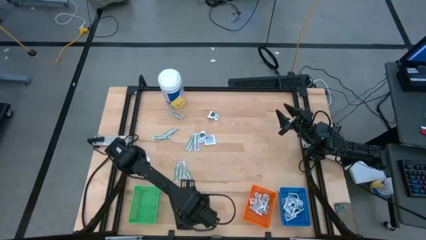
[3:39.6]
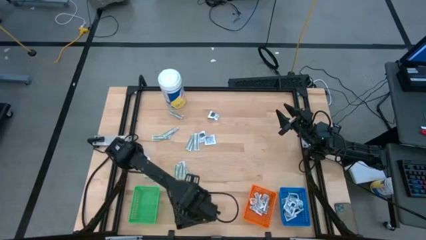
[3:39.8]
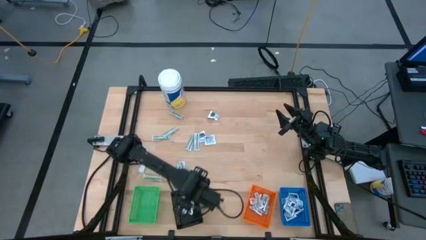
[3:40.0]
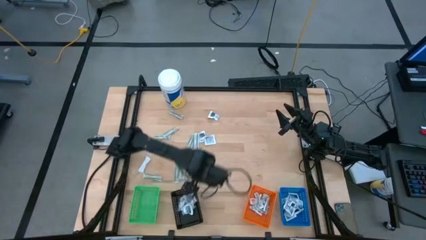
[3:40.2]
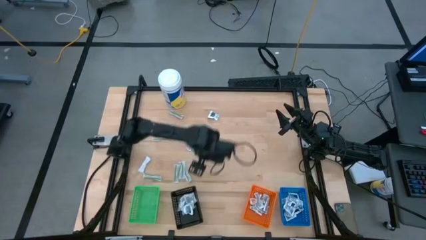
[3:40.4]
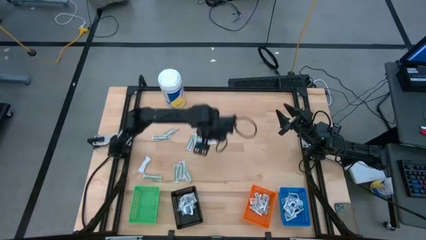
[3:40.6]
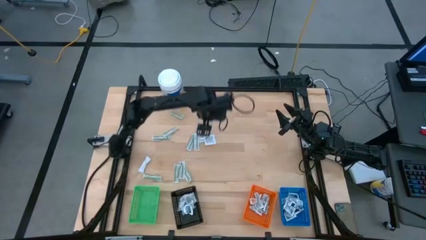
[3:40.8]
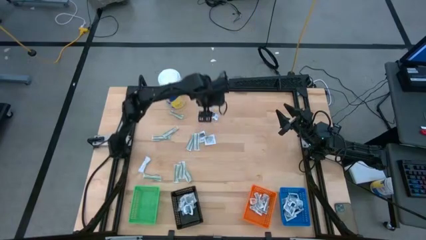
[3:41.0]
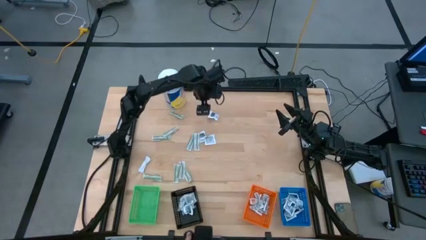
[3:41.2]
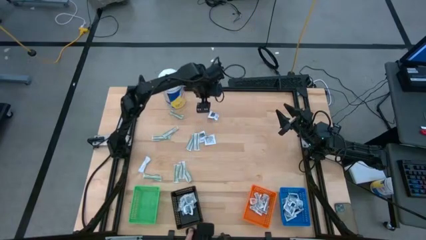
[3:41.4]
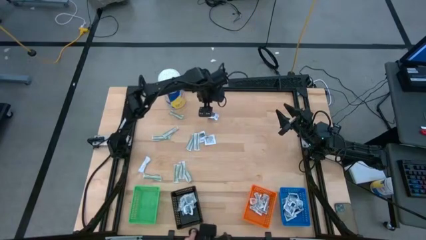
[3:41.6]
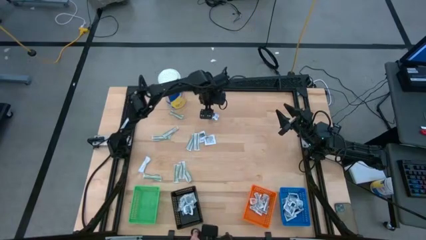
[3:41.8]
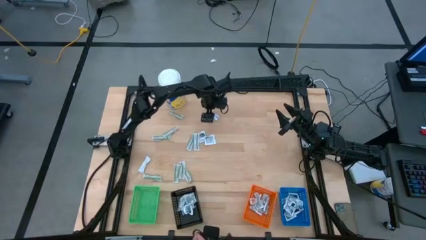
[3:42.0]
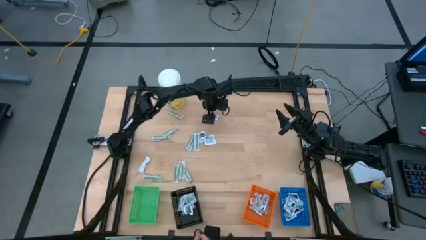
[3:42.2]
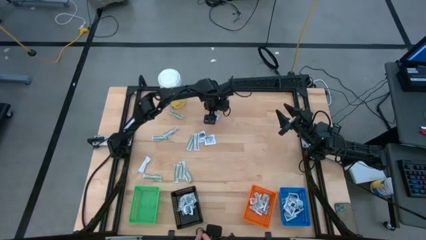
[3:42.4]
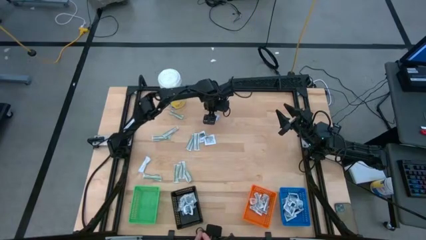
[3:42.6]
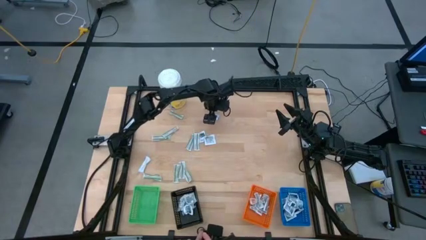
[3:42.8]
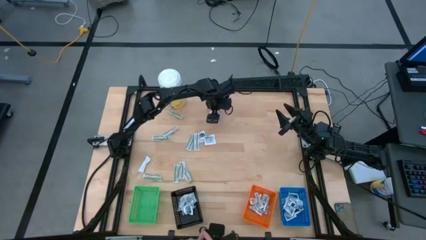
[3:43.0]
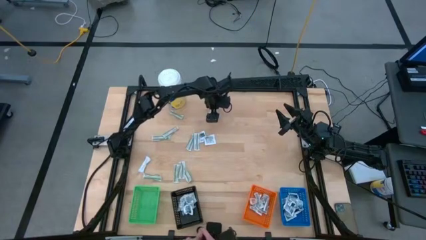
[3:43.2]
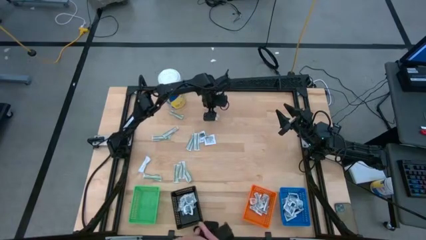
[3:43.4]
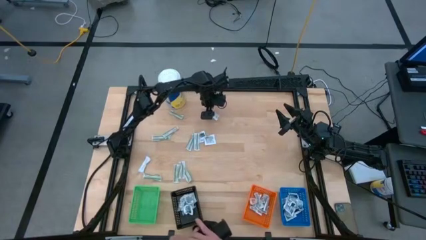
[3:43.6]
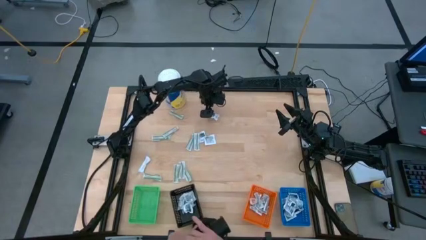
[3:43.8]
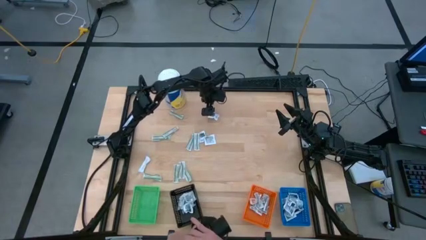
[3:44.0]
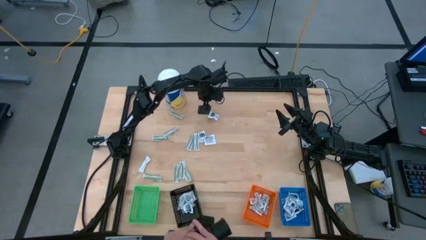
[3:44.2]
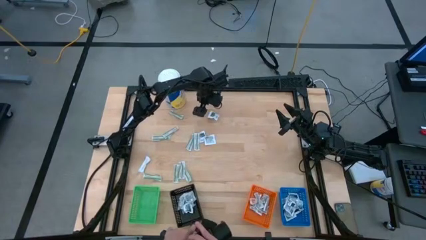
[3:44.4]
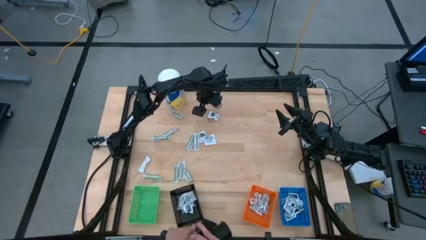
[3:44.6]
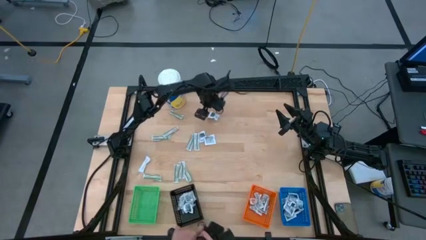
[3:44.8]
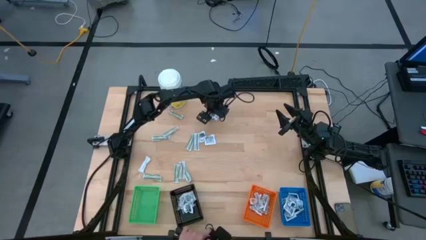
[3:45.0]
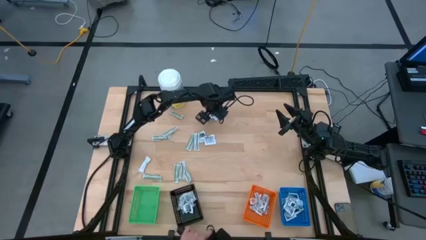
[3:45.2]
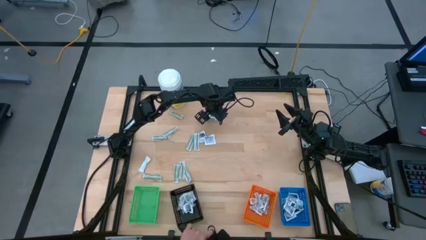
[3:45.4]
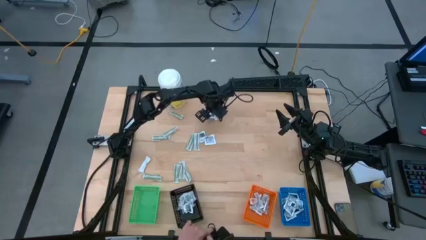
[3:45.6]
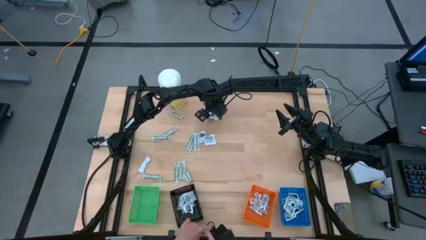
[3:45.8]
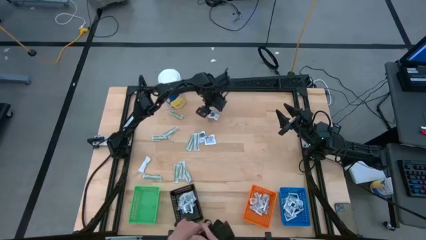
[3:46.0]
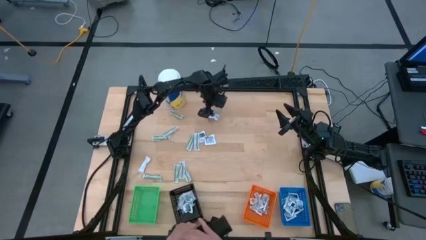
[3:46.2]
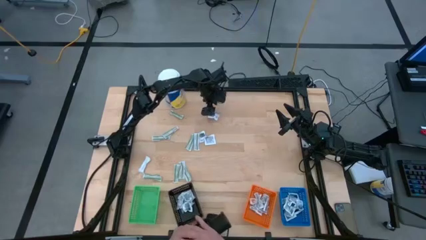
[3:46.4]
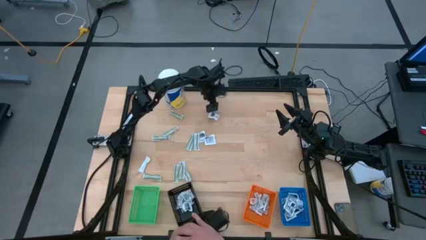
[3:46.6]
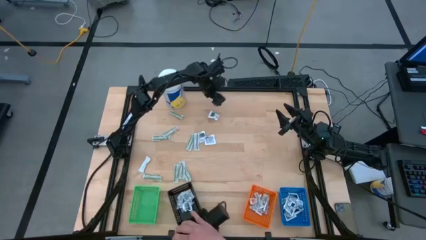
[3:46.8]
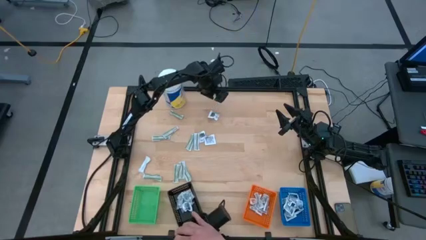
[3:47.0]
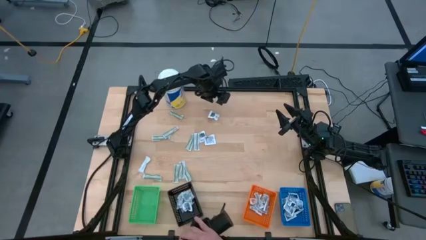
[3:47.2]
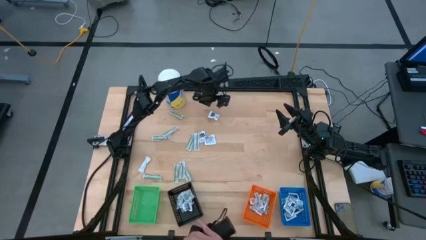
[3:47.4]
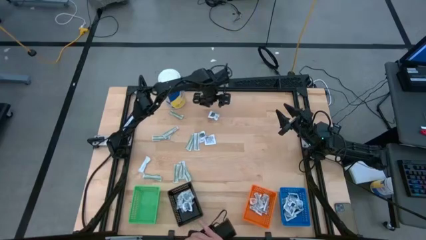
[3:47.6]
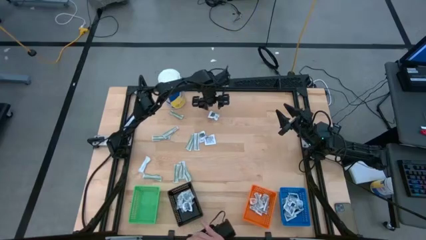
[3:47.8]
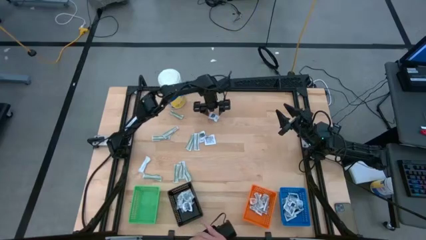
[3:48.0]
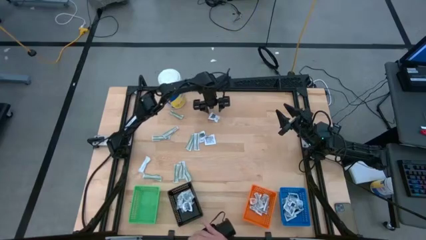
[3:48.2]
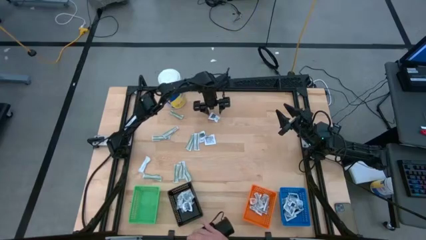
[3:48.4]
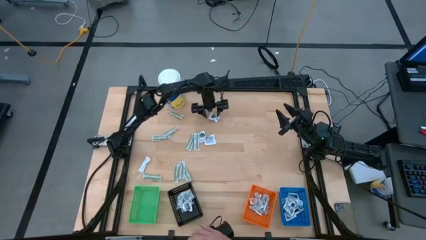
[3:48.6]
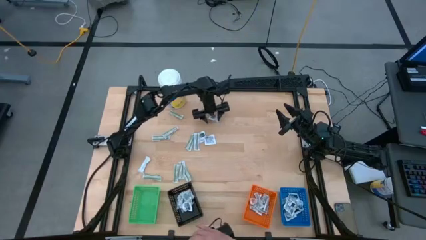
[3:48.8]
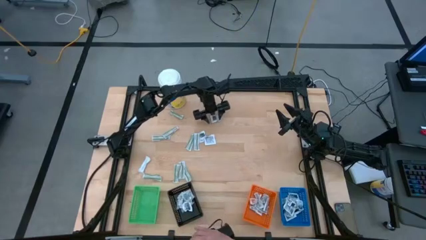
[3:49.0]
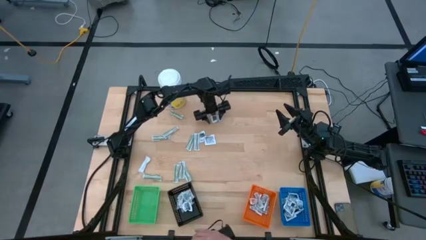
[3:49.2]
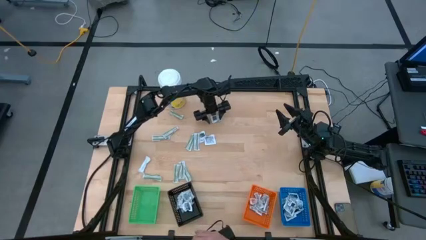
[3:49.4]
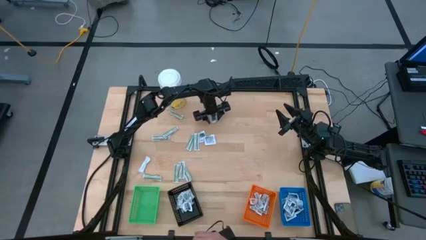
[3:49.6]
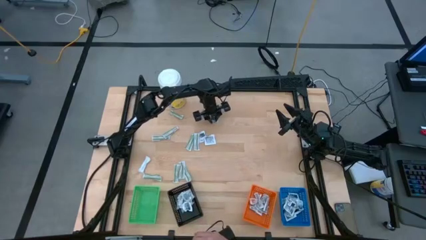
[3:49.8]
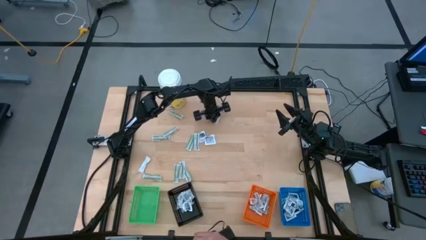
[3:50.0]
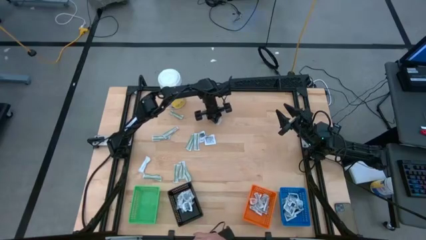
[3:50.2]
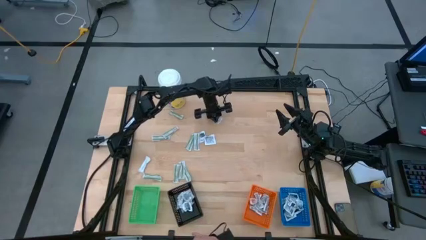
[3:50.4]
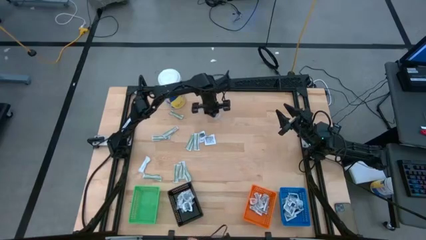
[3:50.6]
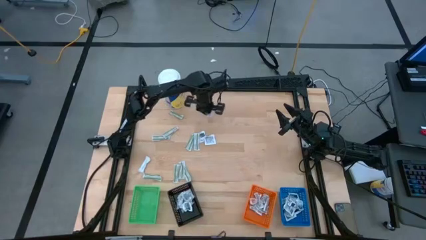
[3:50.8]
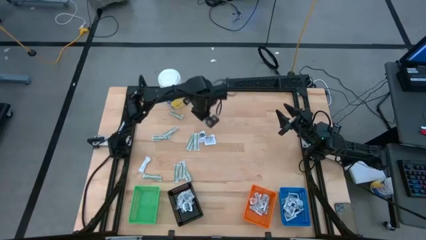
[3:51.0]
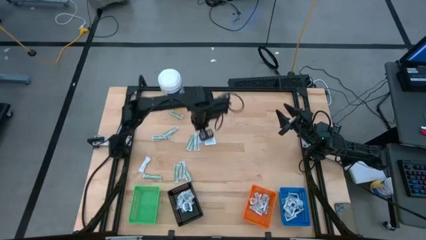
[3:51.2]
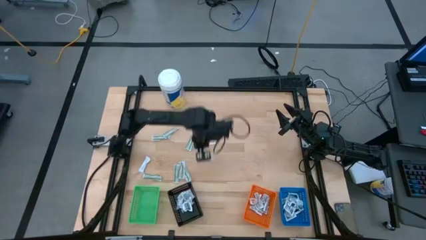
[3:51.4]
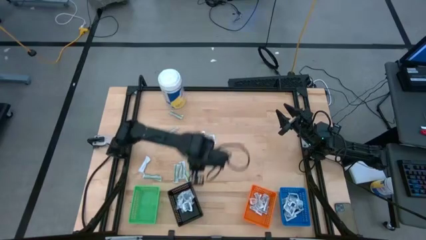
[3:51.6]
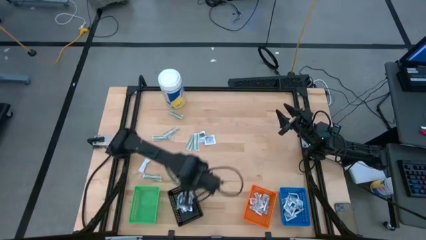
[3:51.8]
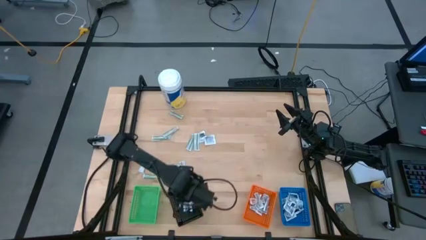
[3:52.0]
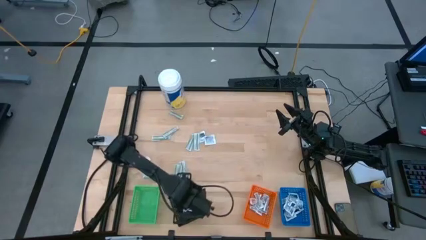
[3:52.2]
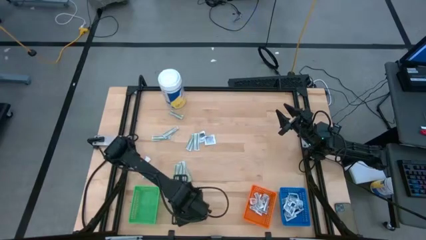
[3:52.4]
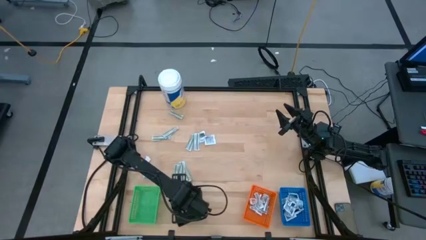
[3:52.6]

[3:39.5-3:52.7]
Task: Pick & Place First Aid Supplies
Put the towelette pack into the black bin

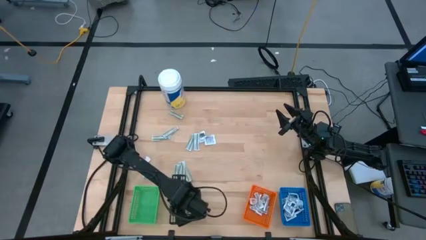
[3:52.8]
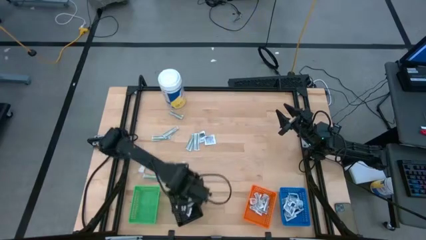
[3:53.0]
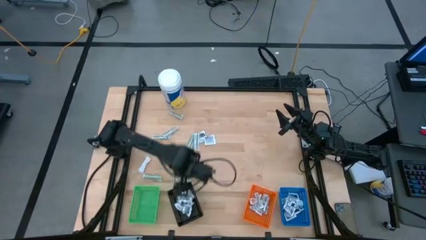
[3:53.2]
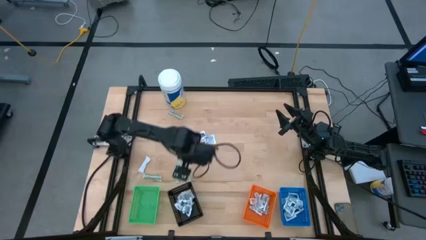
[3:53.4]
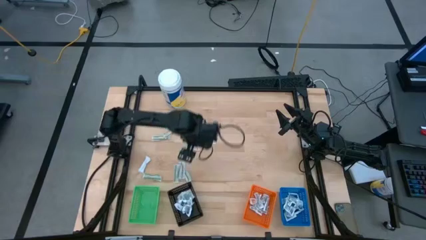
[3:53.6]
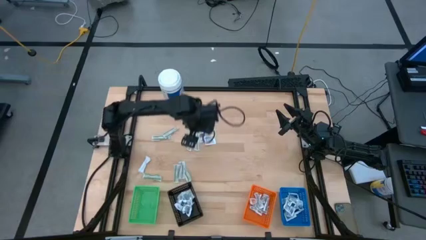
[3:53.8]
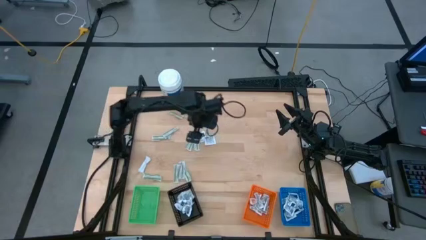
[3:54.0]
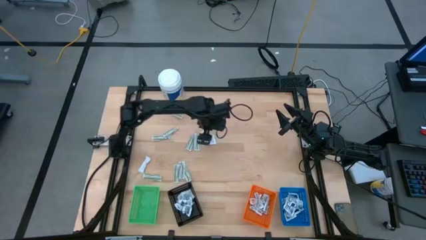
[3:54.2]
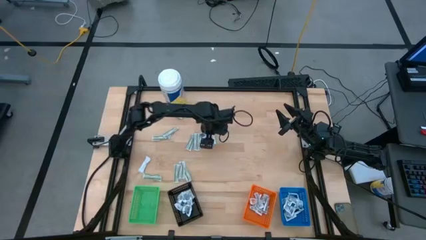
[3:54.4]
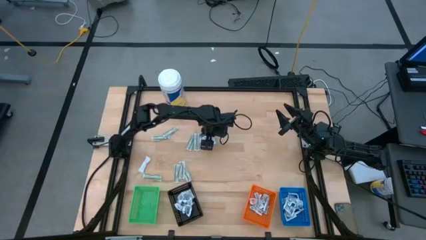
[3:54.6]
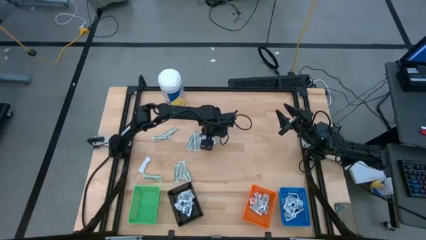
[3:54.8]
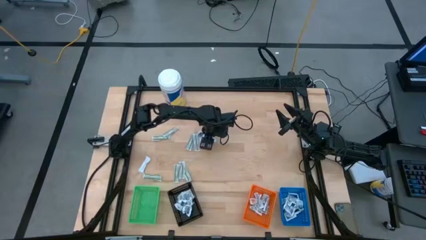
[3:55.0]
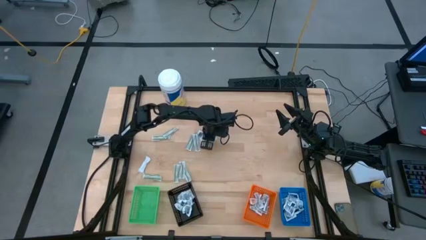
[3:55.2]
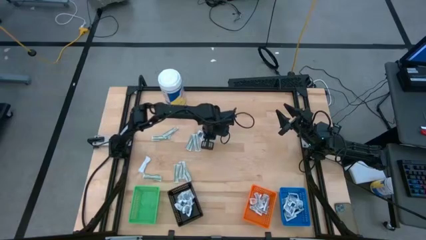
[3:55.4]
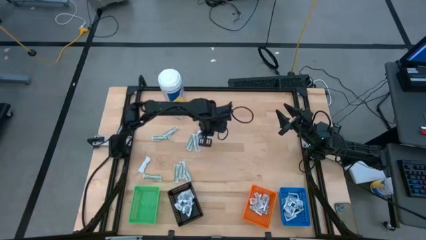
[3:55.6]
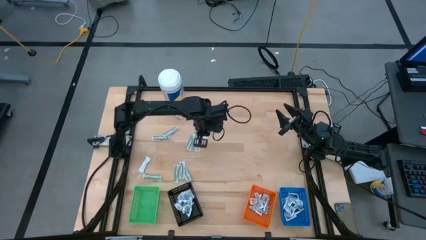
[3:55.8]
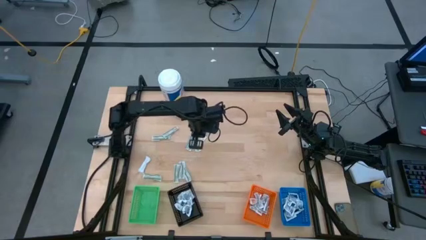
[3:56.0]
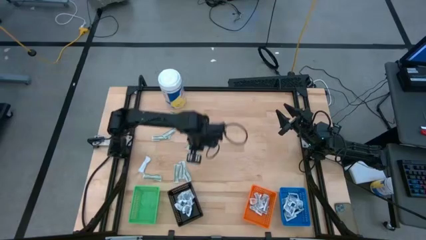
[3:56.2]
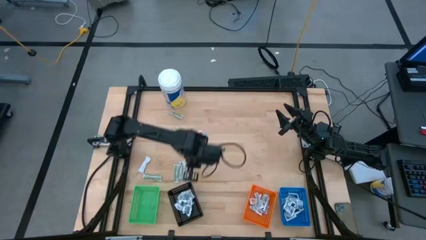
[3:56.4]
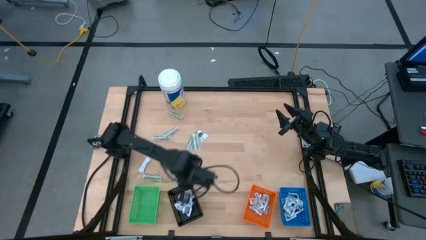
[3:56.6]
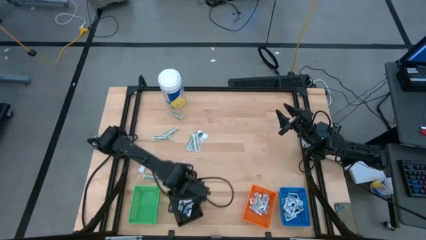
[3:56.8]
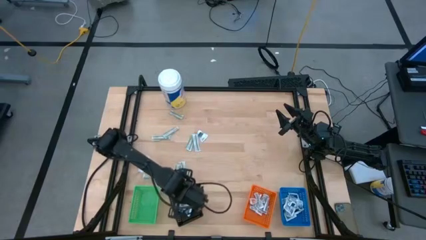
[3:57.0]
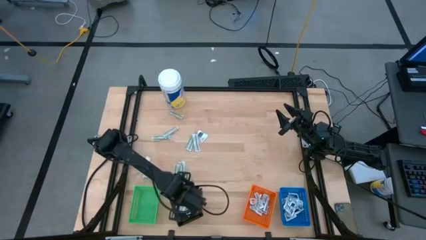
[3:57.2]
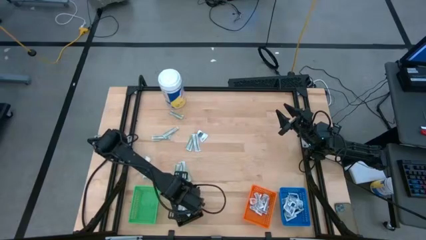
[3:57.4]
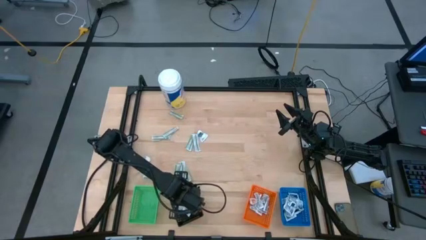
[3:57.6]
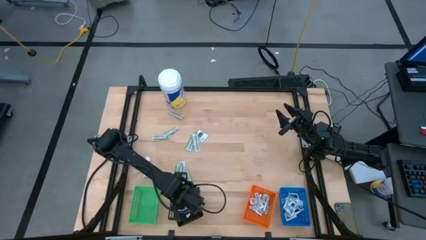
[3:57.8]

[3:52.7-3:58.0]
Put the towelette pack into the black bin
